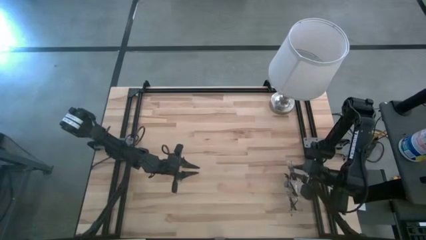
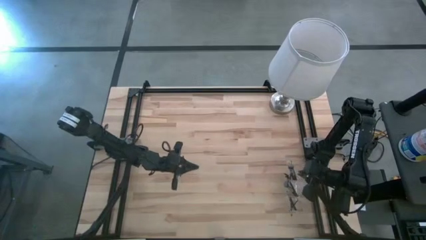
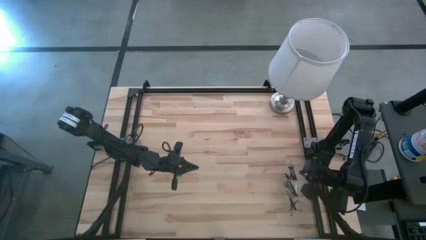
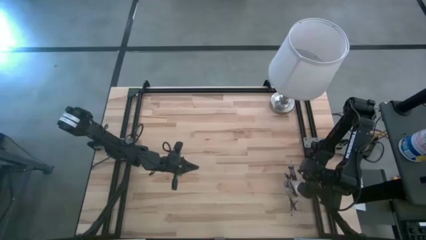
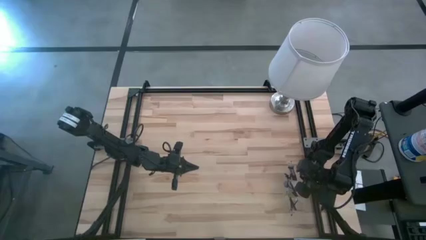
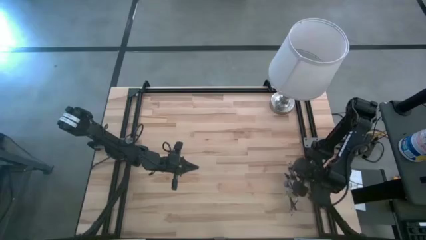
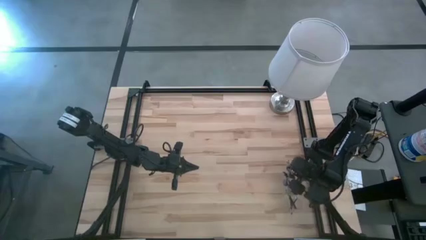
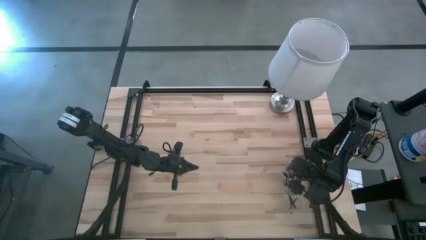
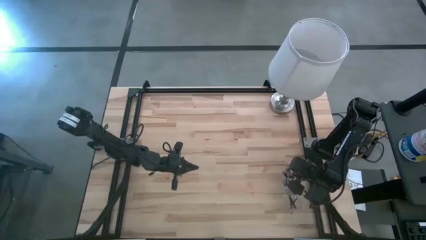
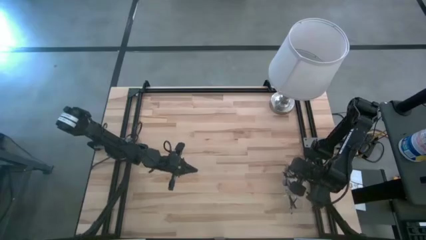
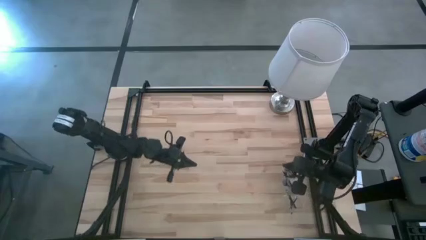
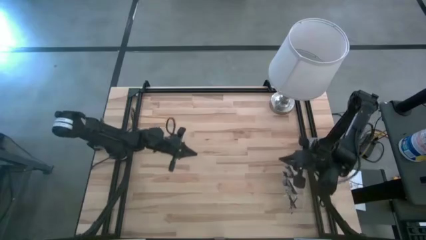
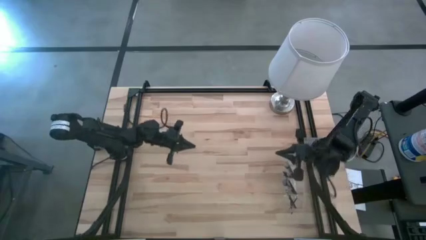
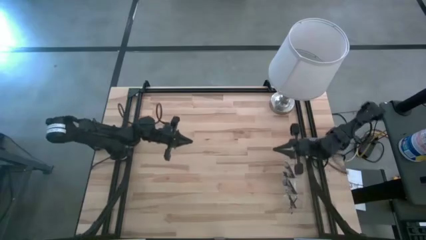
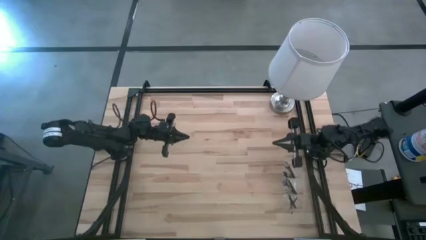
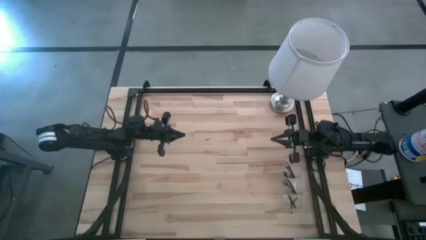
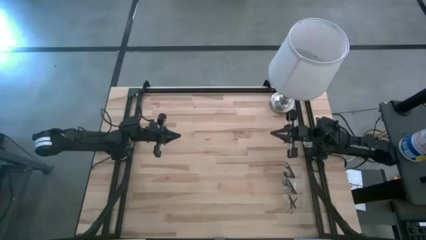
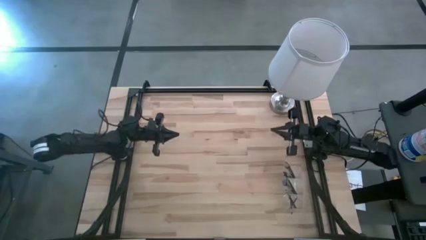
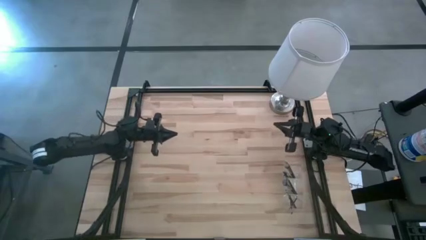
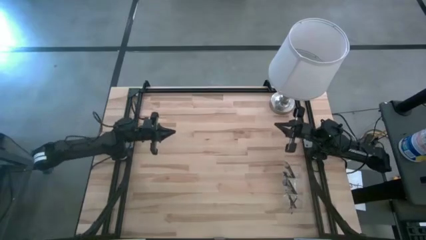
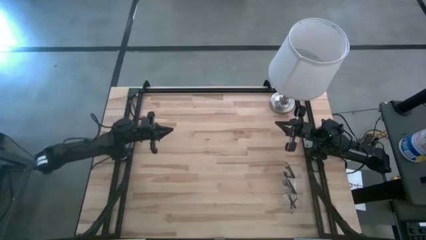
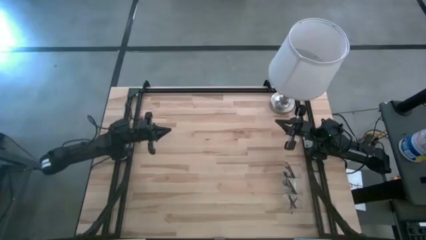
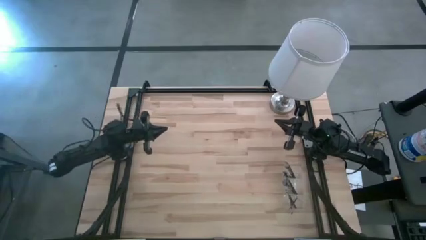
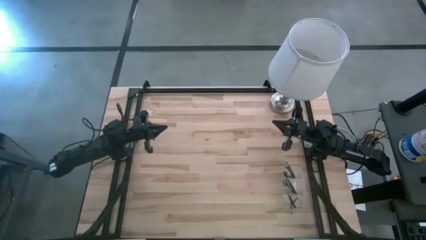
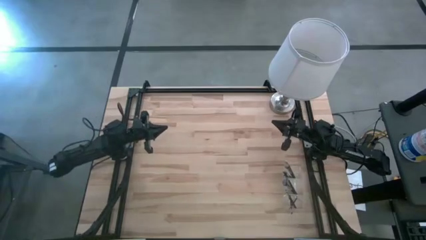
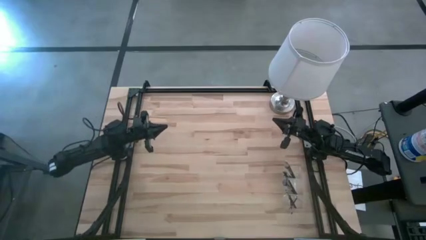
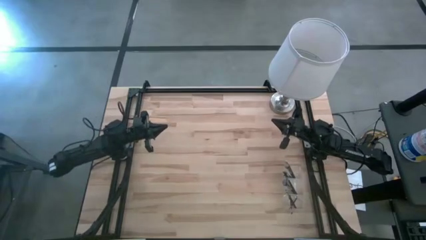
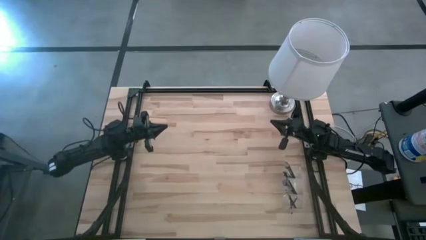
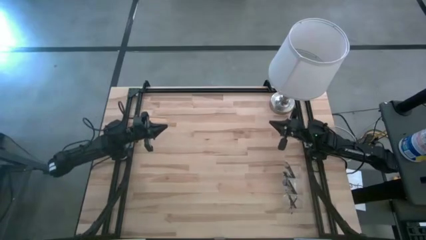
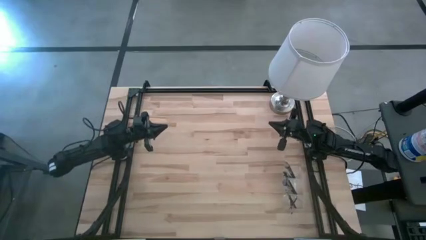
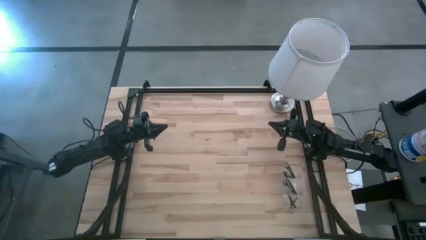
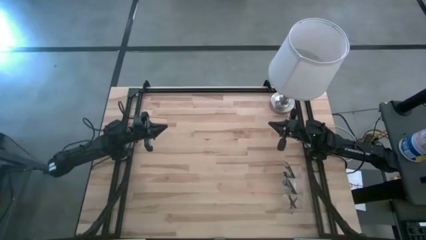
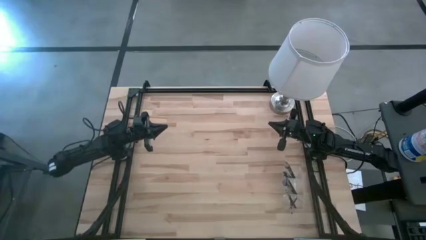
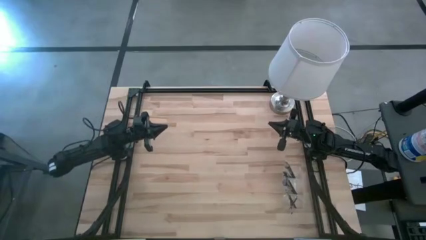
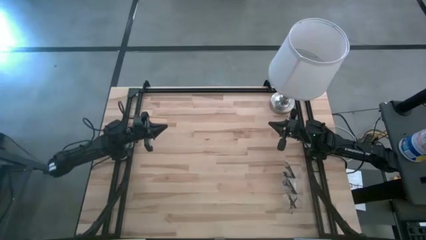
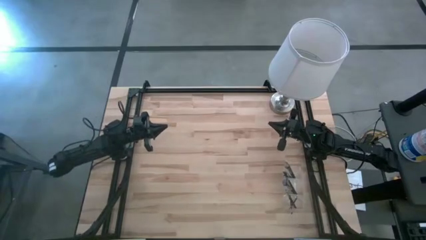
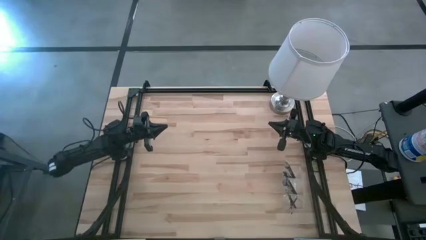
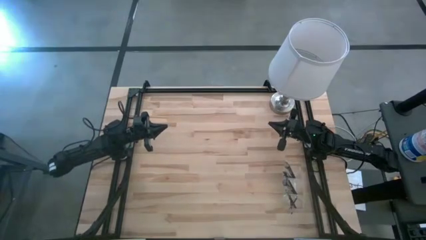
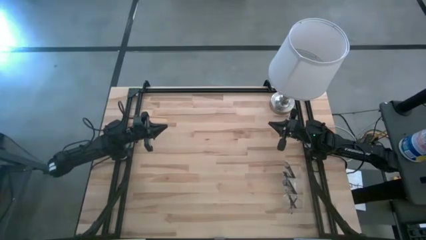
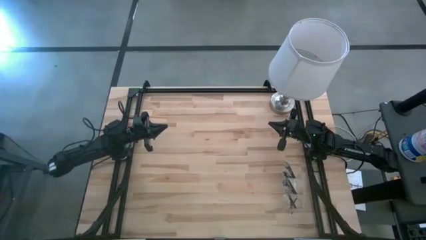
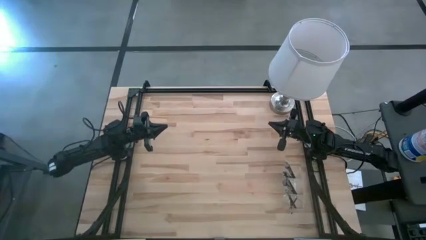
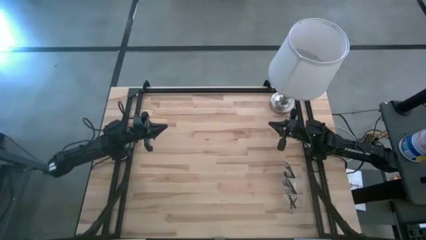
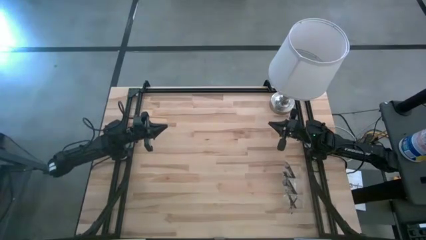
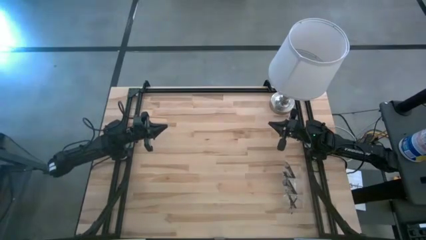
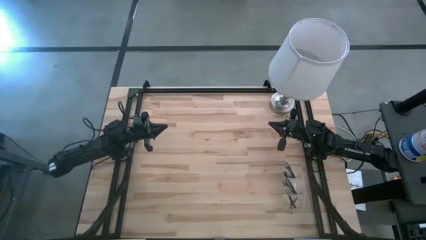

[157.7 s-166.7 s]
Task: Put items in baskets/containers
Return to Home Position
